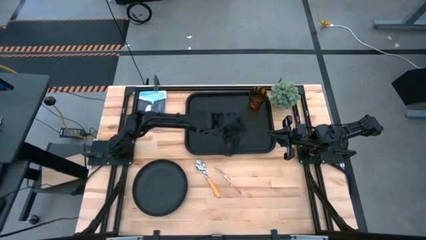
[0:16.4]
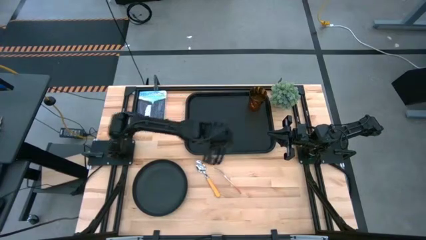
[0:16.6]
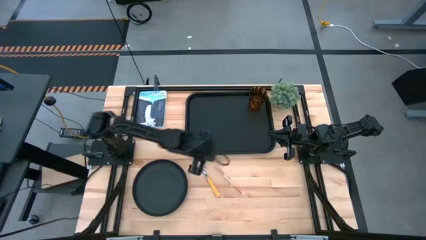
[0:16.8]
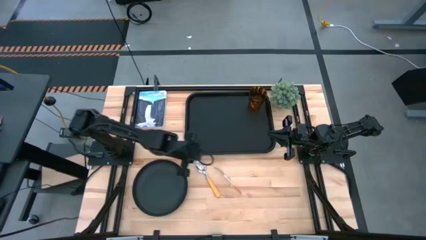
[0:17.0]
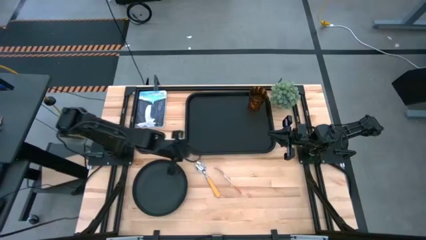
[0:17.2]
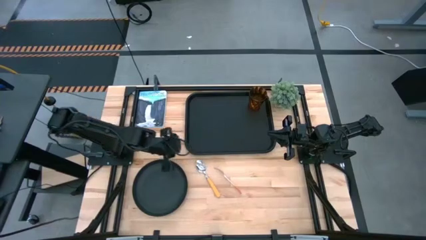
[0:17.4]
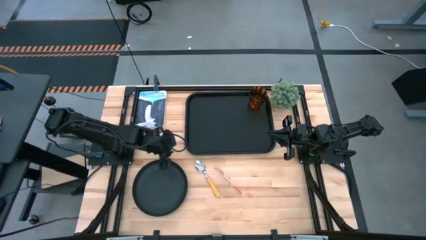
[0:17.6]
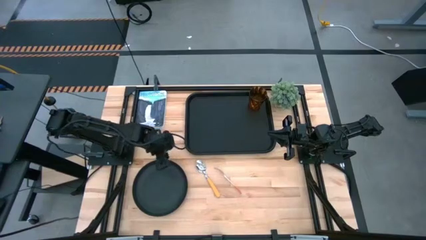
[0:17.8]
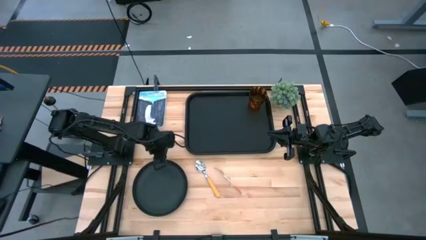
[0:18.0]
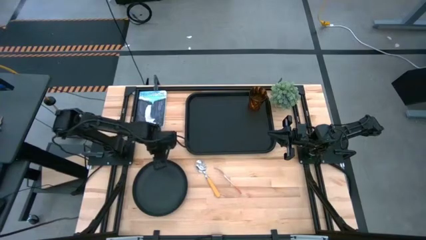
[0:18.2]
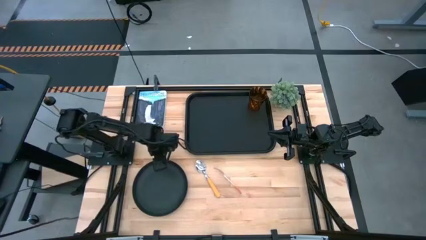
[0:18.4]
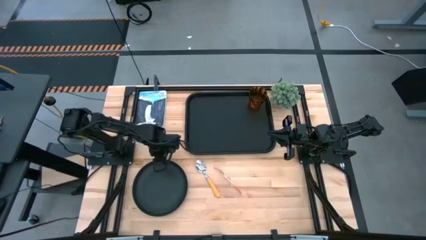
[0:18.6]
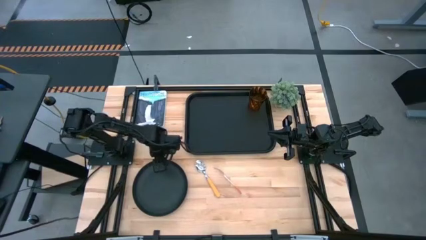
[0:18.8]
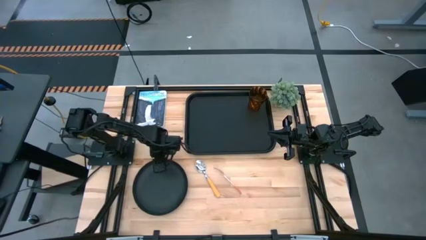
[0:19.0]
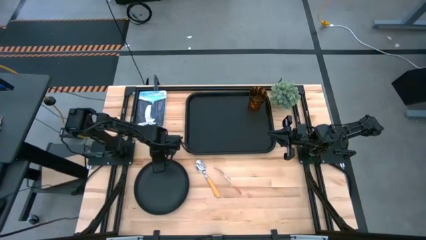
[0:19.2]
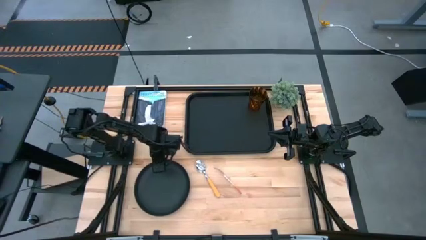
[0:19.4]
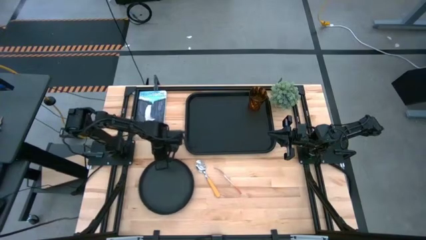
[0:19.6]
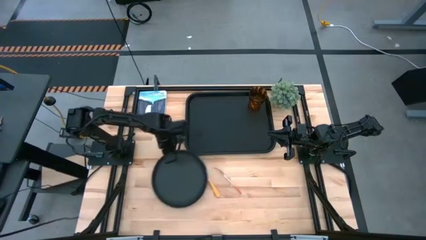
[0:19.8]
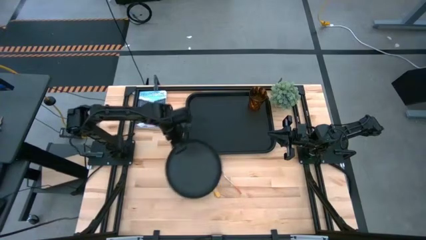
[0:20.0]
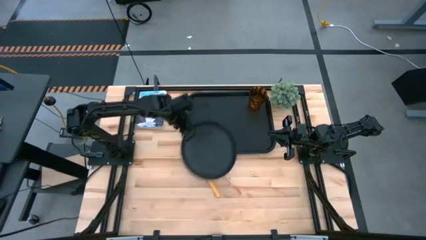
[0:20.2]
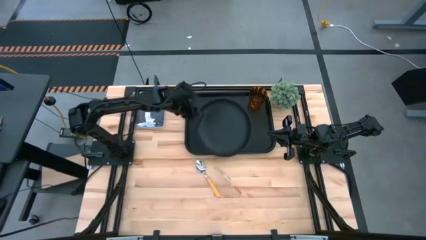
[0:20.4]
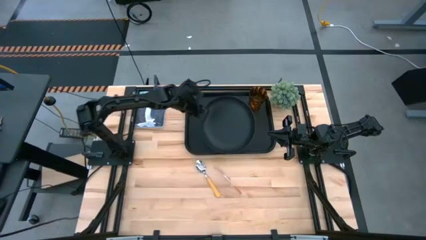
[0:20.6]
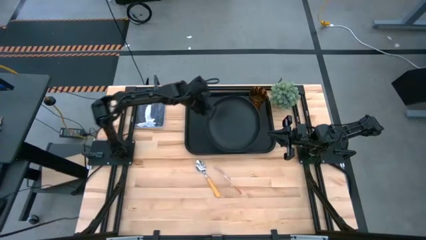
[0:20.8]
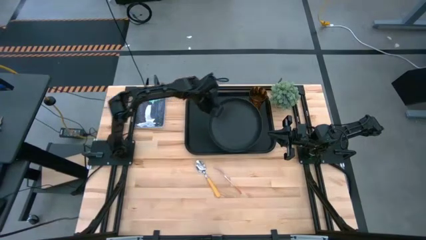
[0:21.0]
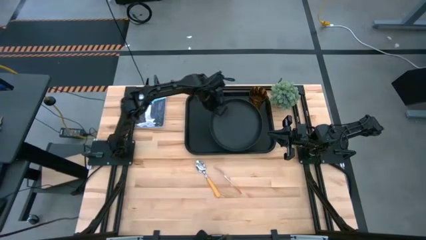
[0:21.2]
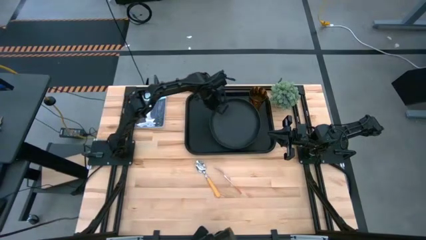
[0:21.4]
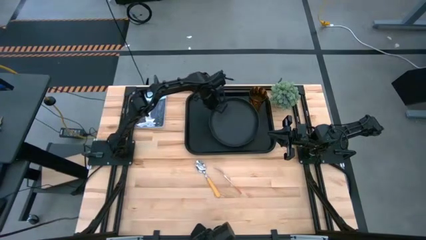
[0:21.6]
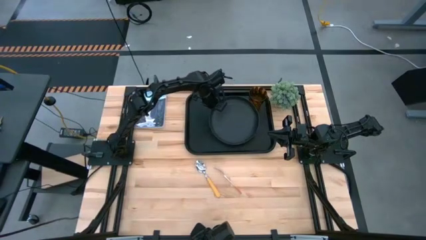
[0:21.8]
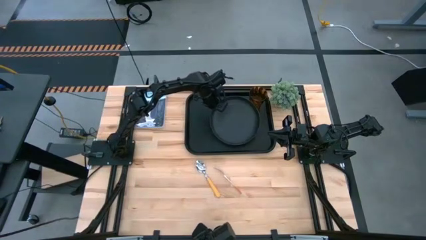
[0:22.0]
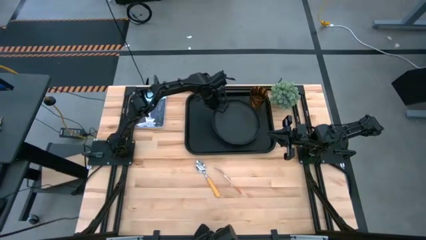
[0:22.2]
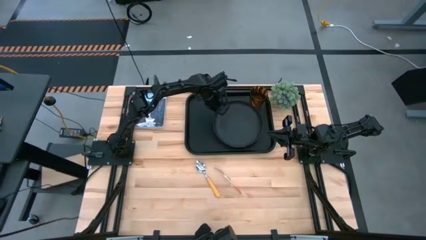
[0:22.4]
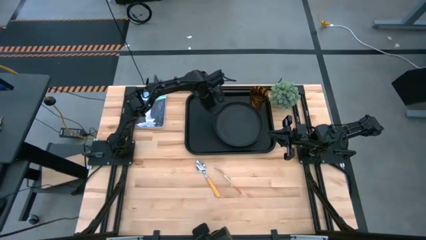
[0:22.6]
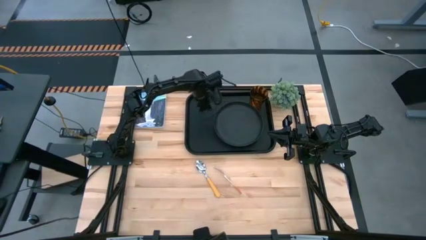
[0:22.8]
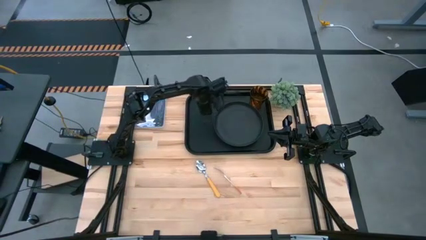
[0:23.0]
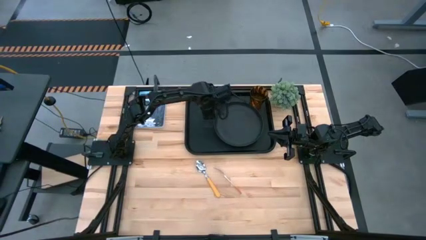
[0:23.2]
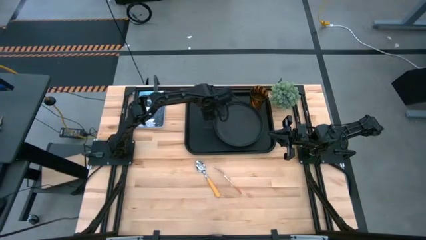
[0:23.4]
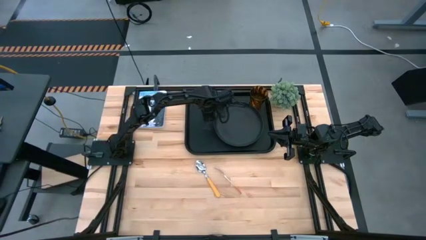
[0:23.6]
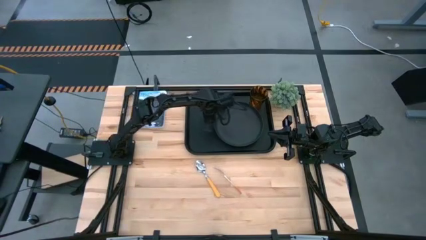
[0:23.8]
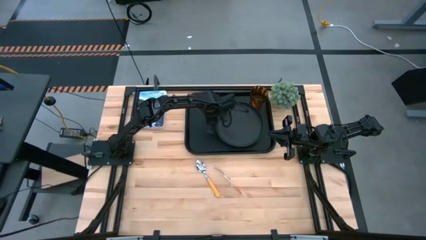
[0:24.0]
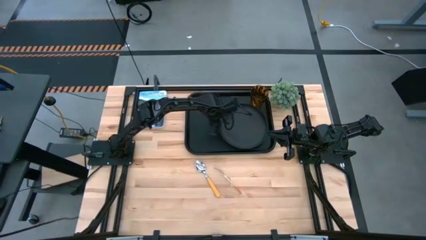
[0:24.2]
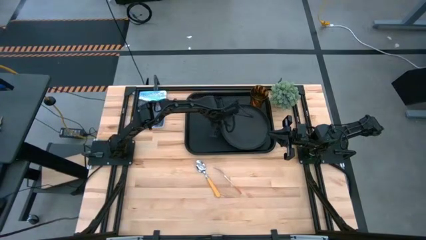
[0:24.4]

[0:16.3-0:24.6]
Task: Pick and place plate/cup/fork/spoon on tray
Put the black plate on the black tray to the bottom left of the brown cup

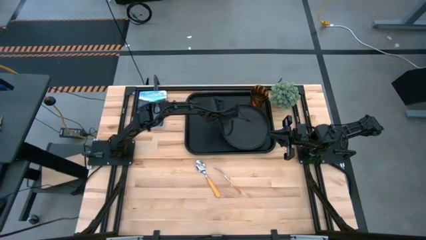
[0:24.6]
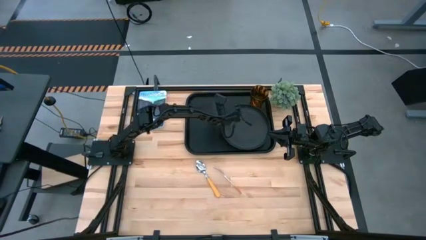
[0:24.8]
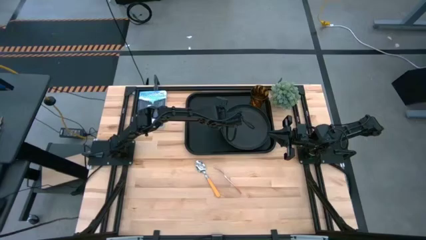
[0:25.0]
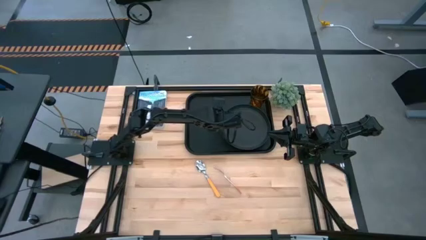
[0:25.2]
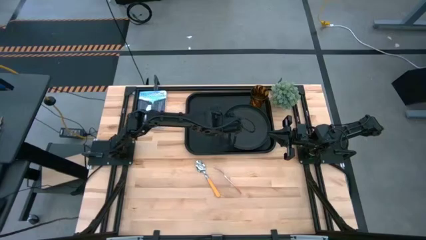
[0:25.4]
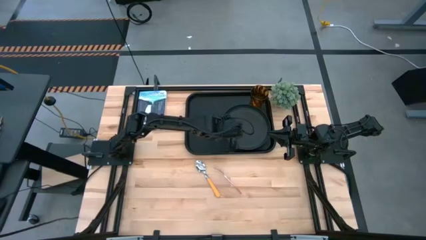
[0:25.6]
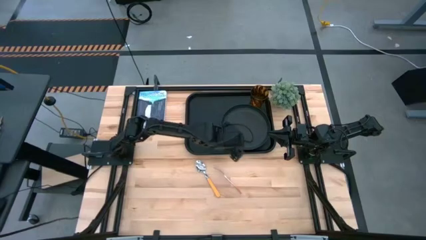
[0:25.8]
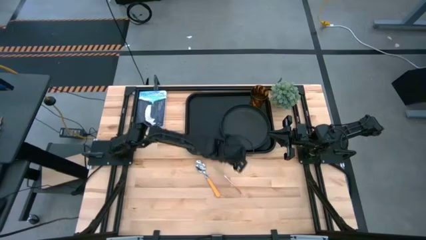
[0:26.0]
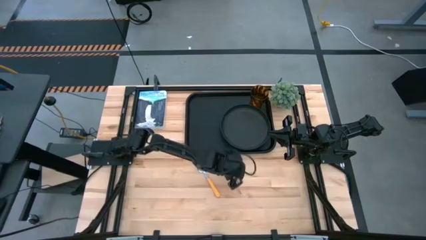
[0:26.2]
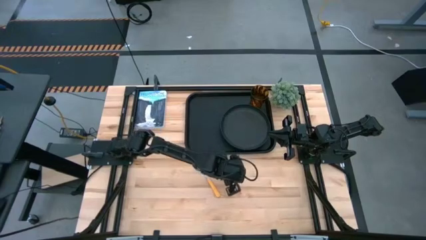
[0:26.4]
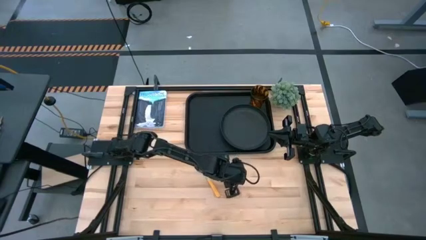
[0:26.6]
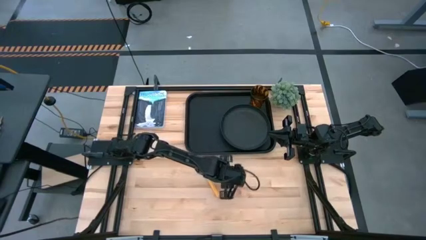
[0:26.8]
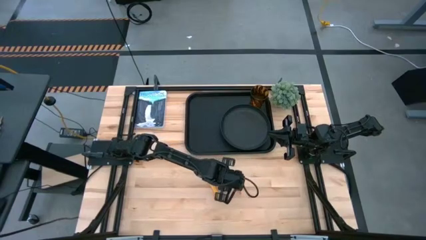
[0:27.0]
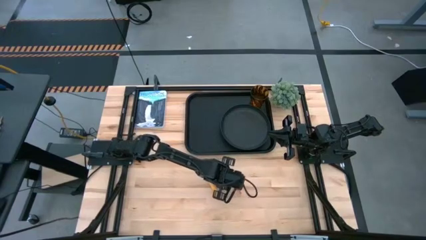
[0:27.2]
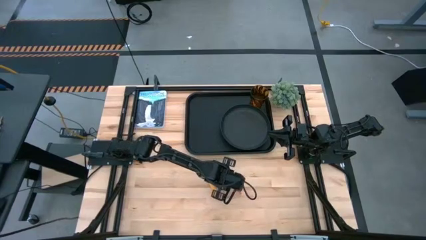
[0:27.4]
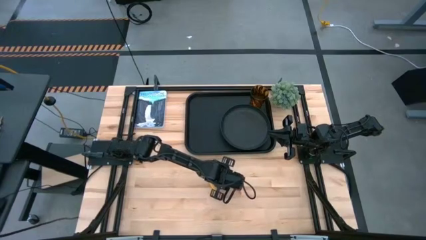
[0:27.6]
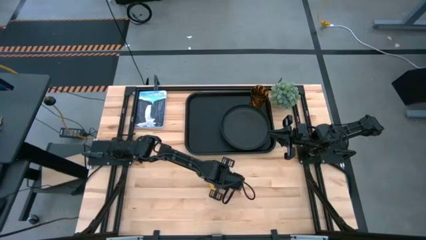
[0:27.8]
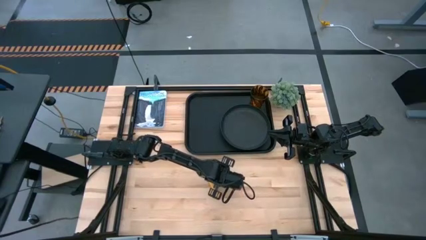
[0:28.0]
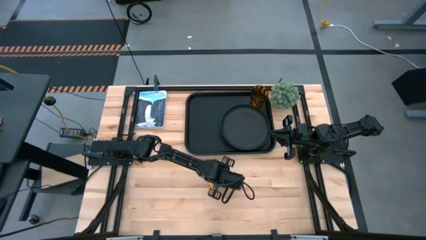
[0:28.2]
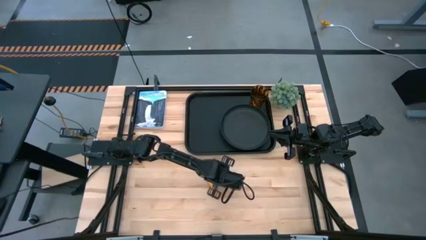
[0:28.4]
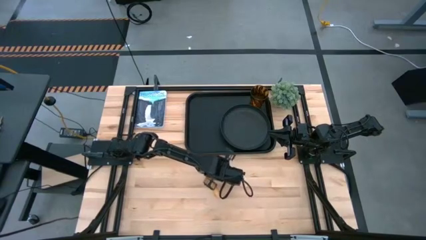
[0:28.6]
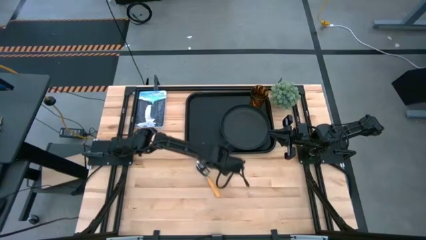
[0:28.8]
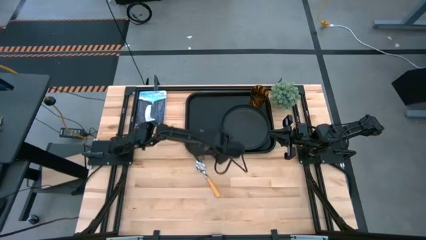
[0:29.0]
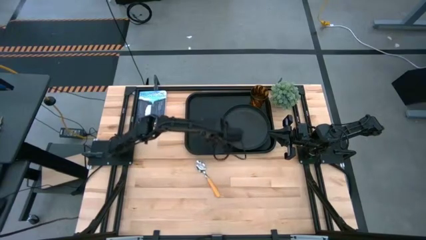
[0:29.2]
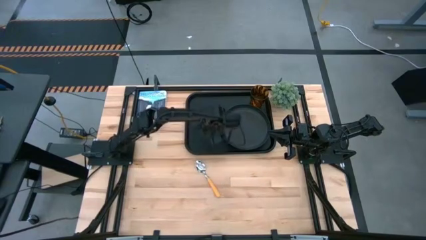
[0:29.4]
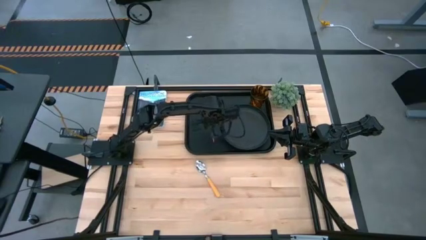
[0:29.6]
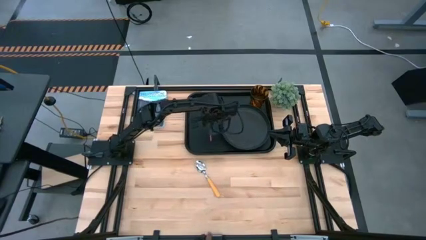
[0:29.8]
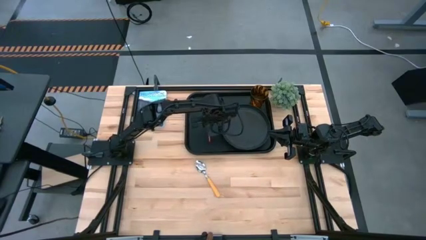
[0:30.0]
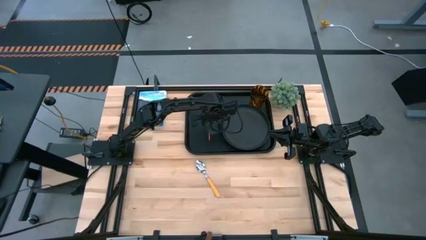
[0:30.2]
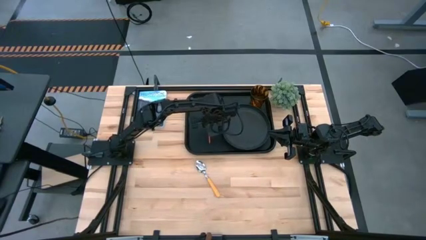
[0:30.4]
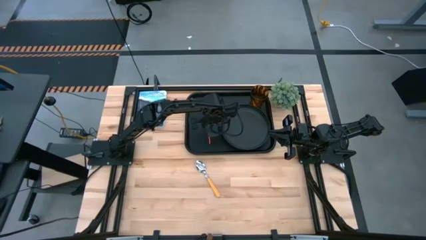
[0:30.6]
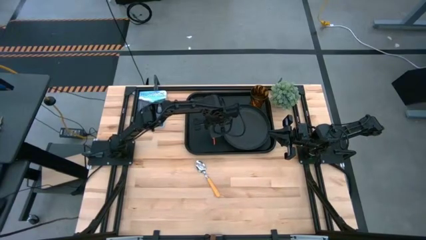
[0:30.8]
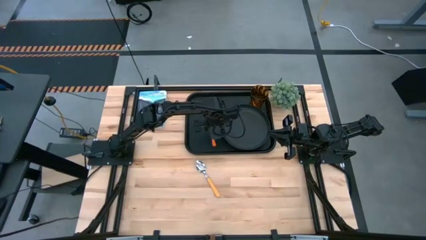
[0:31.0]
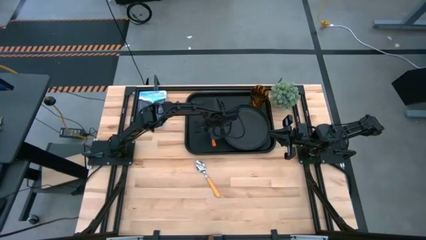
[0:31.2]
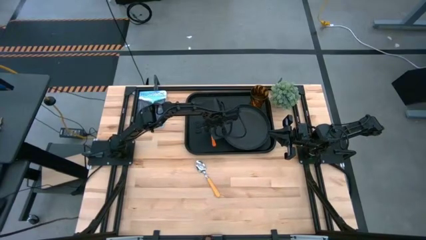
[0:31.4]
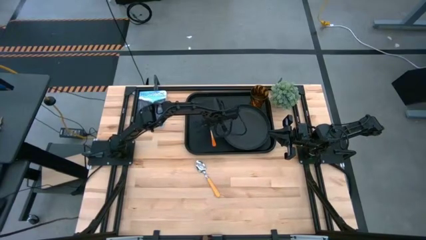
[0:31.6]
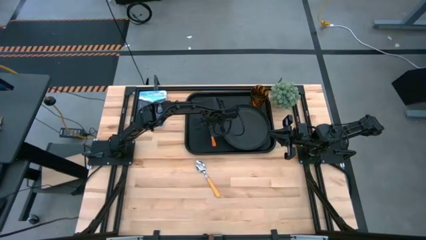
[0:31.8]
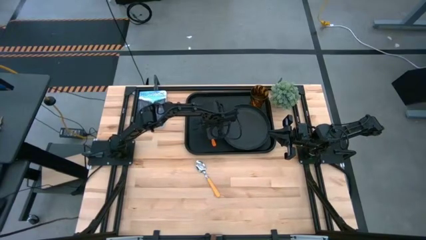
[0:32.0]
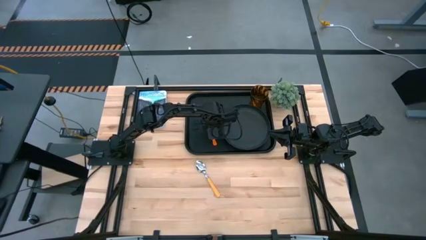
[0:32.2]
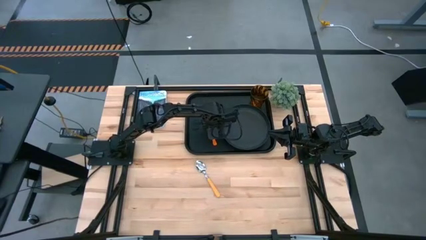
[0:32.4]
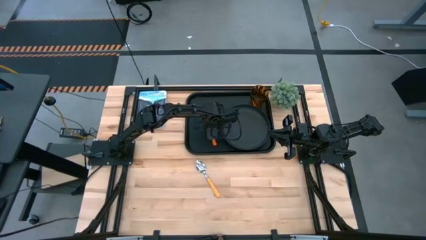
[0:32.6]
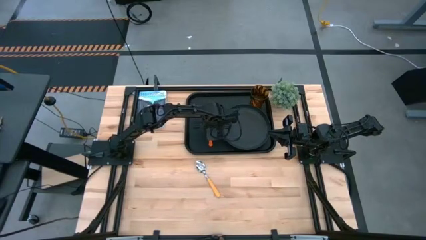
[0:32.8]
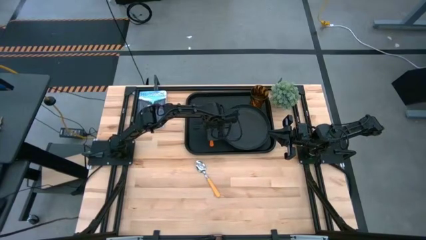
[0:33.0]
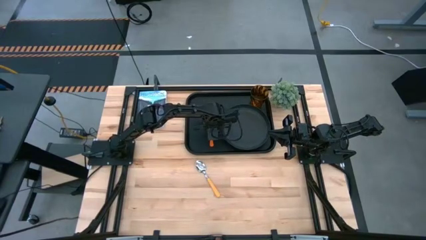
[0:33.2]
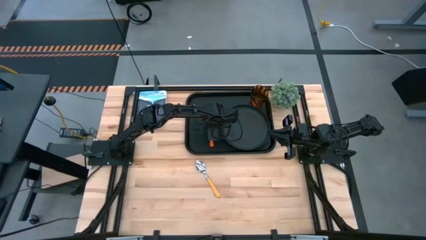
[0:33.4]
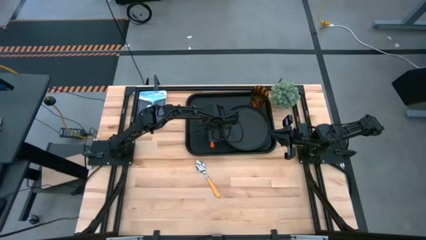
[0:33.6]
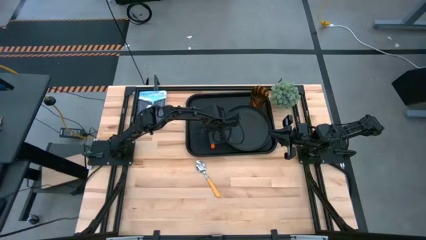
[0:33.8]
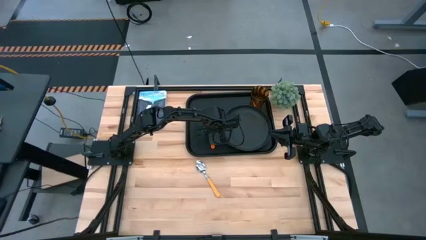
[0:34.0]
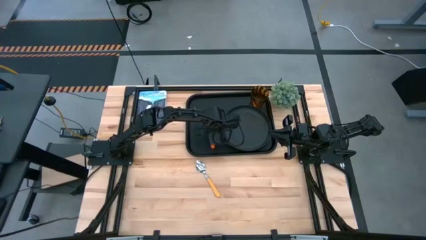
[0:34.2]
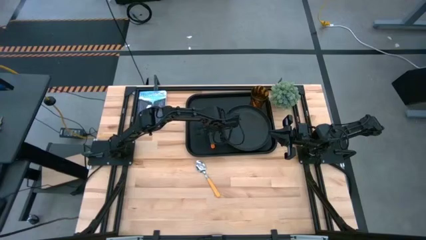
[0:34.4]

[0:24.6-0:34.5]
Put the orange fork on the black tray to the left side of the black plate
